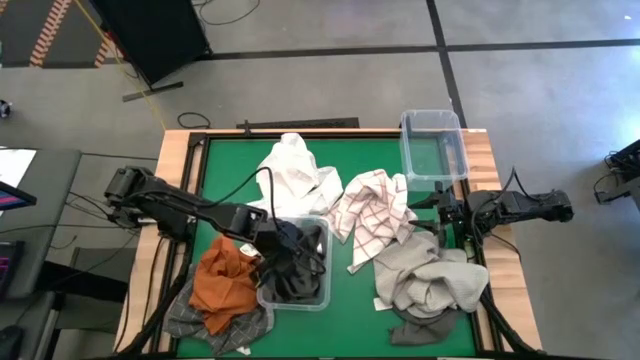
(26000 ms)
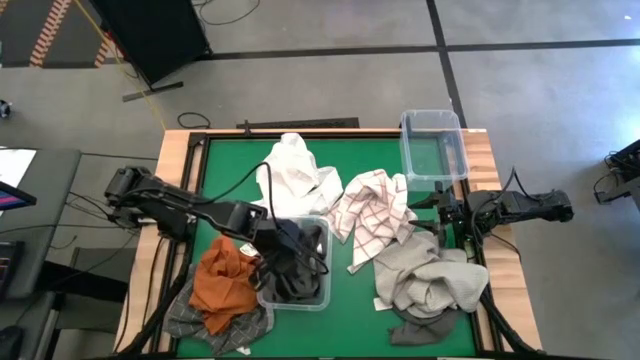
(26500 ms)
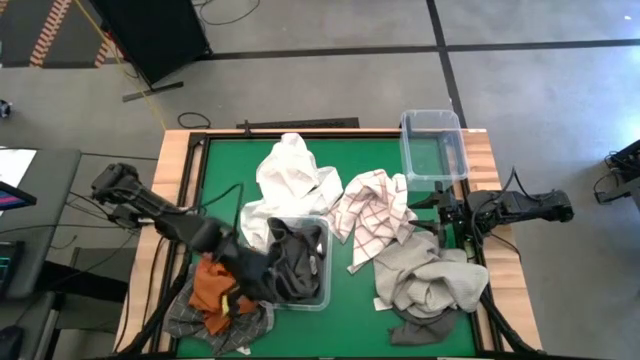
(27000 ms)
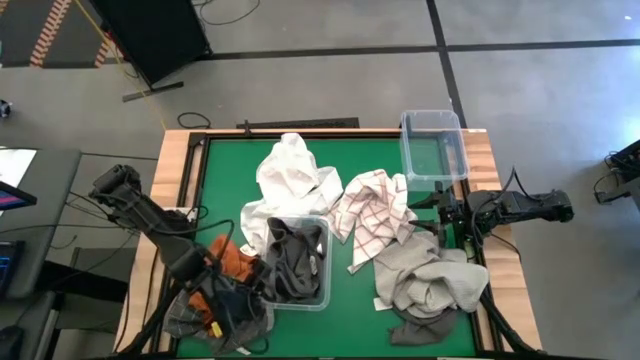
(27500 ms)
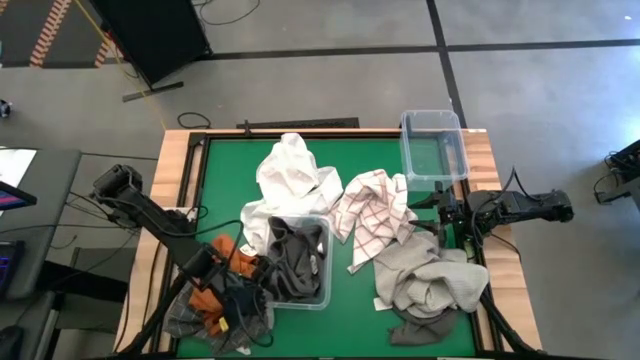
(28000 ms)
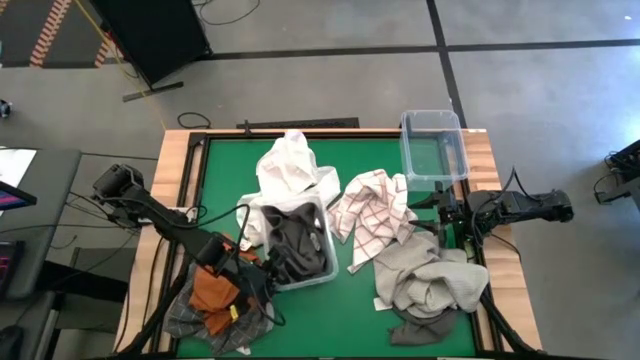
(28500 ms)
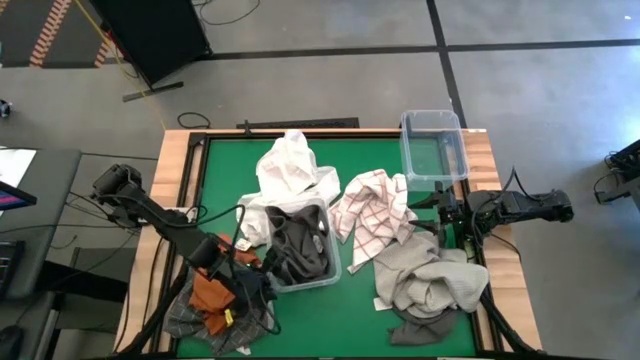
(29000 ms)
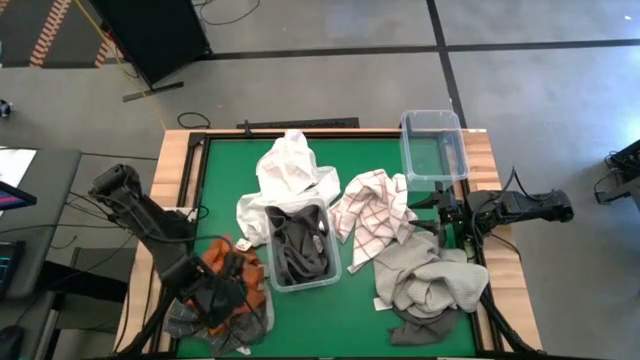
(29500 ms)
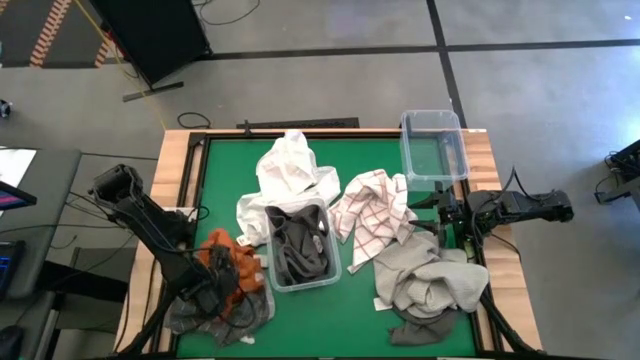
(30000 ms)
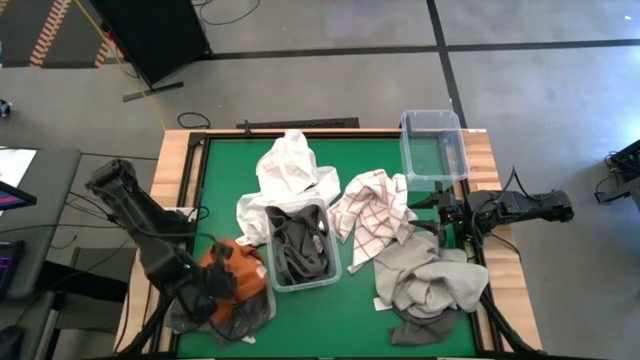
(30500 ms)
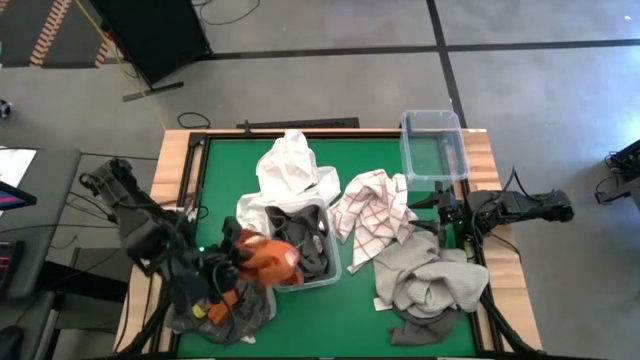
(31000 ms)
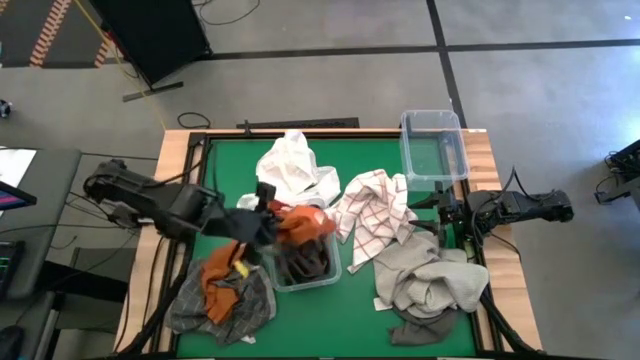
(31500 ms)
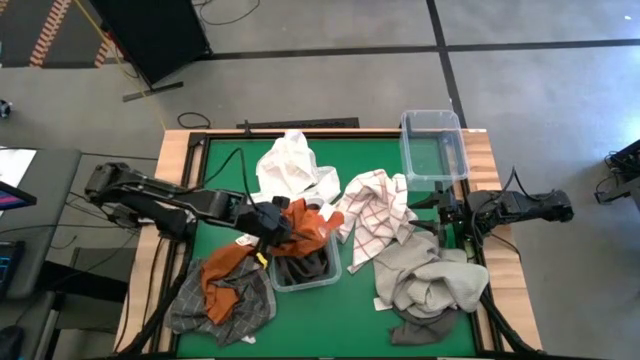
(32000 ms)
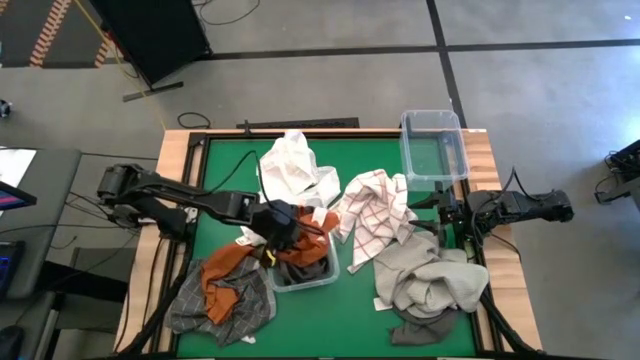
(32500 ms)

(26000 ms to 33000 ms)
Task: Sort towels by color in basket
Put the orange towel into the bottom transparent bin

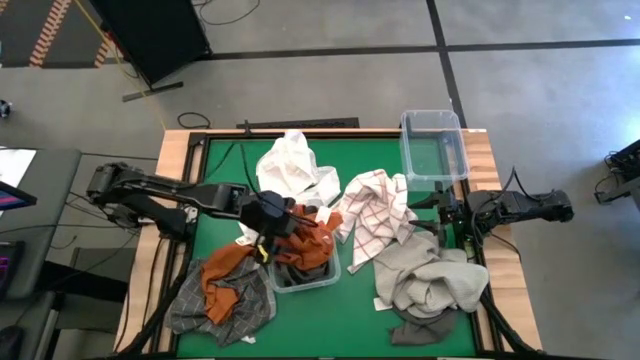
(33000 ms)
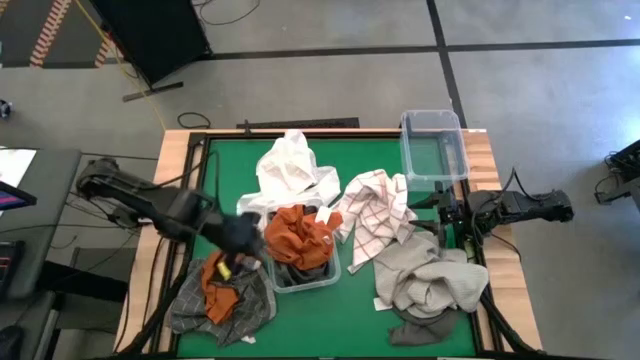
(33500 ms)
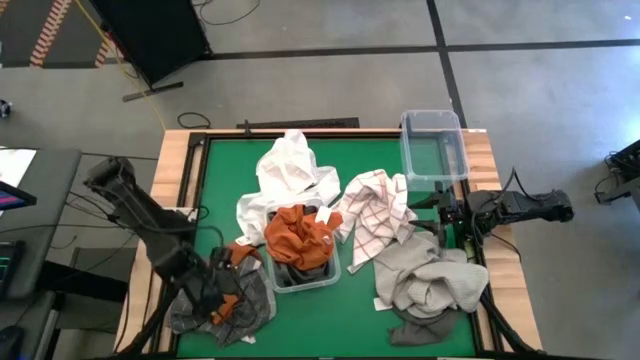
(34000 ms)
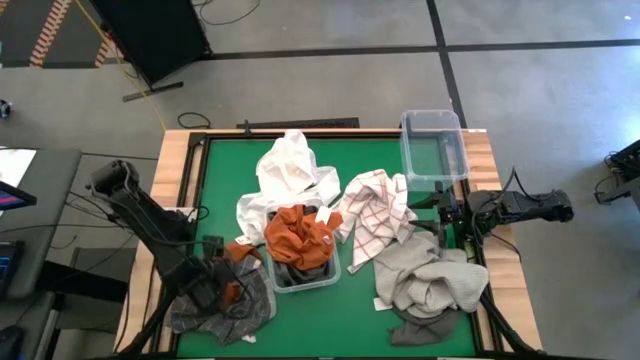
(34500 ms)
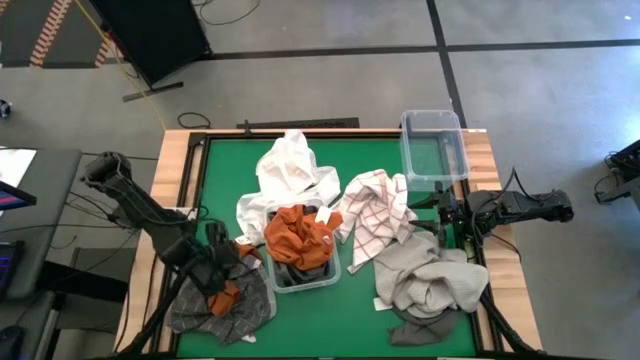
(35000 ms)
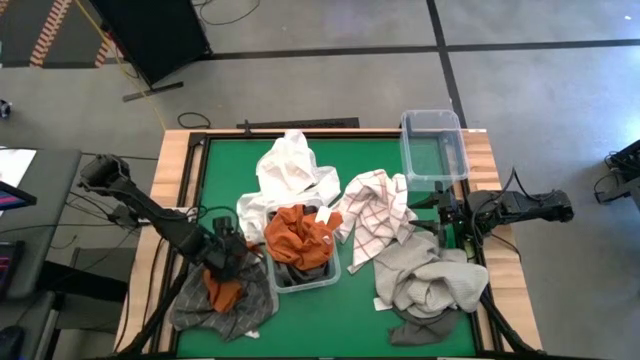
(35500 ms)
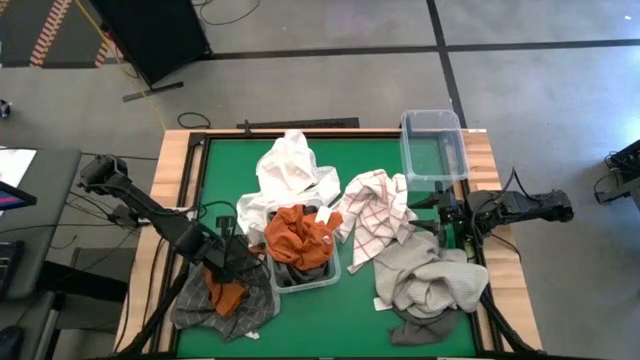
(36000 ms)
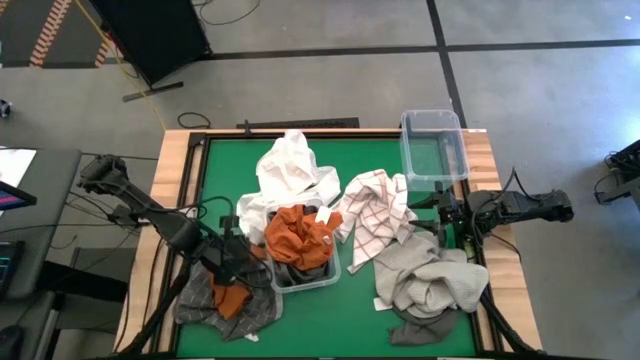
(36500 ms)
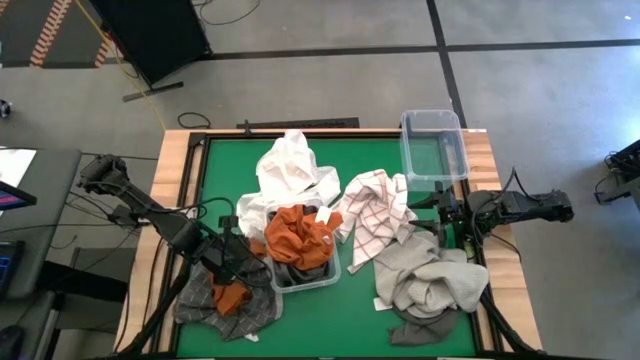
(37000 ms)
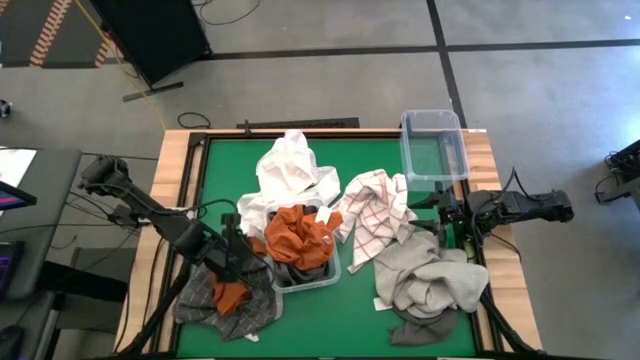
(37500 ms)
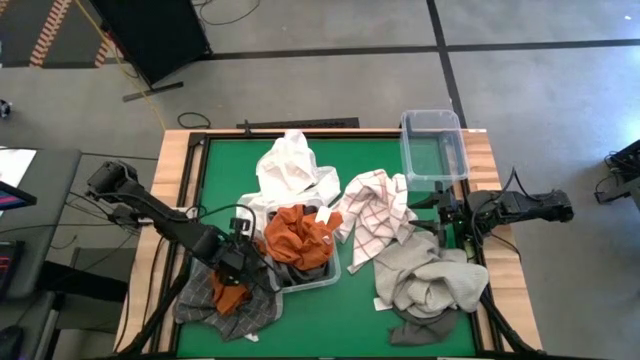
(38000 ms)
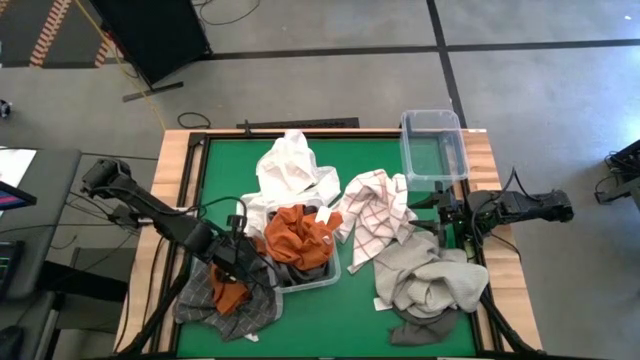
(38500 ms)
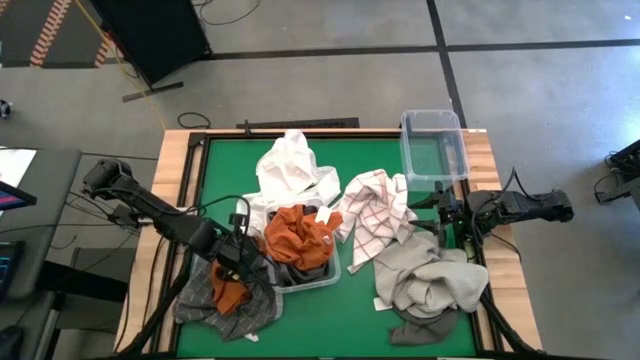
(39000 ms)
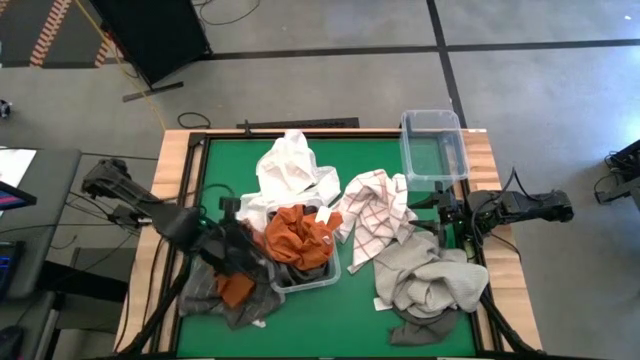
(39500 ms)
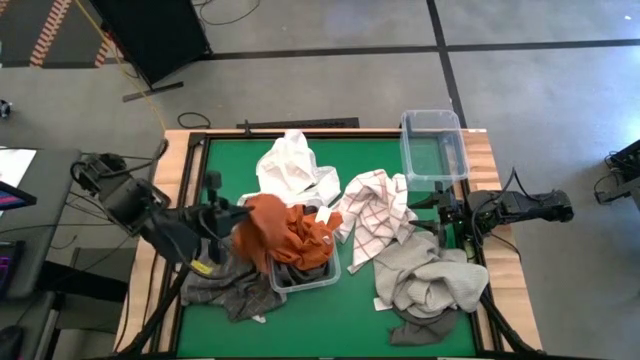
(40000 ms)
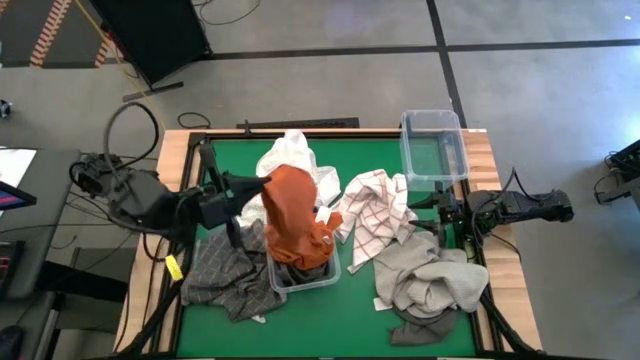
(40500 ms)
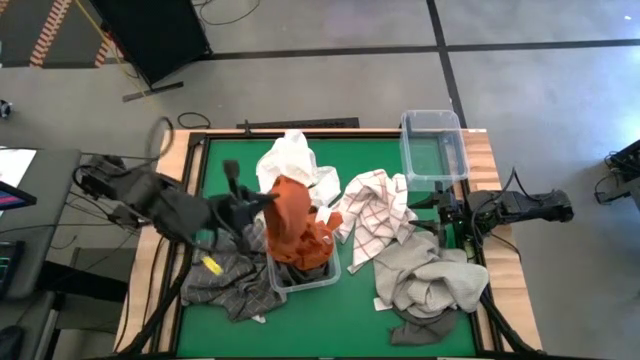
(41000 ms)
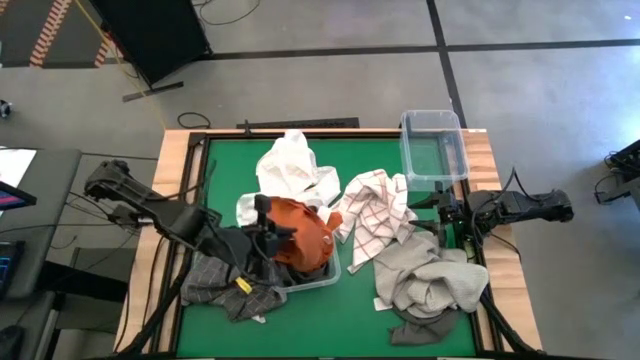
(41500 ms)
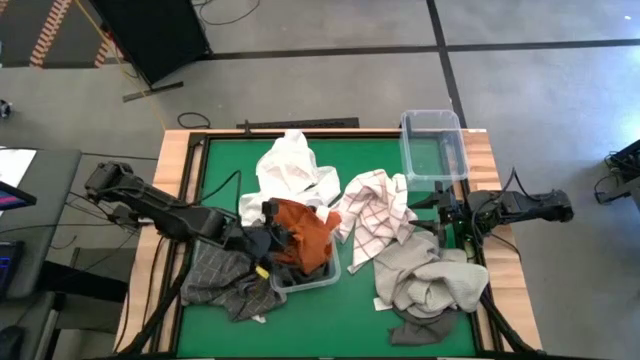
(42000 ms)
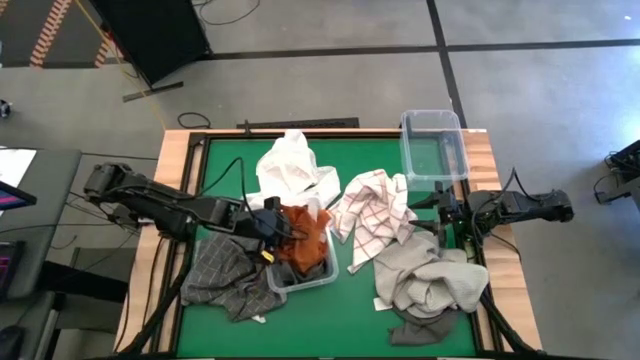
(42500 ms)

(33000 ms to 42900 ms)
Put the orange towel into the bottom transparent bin

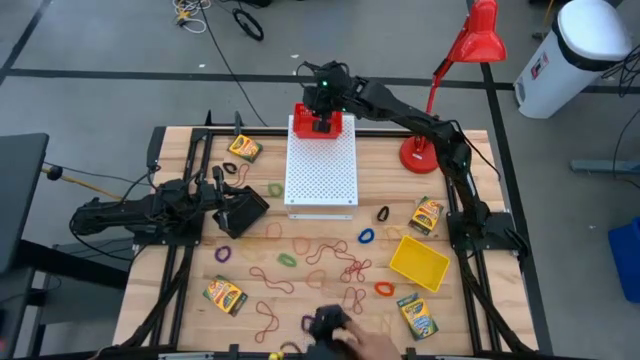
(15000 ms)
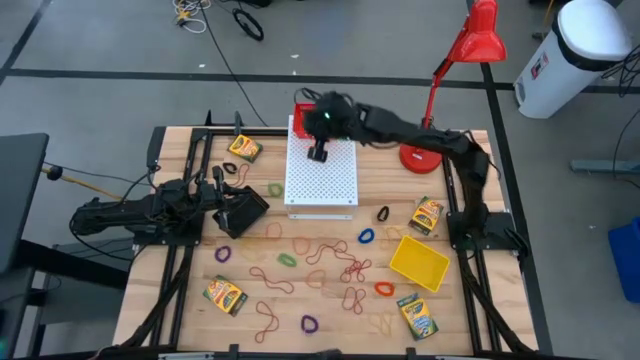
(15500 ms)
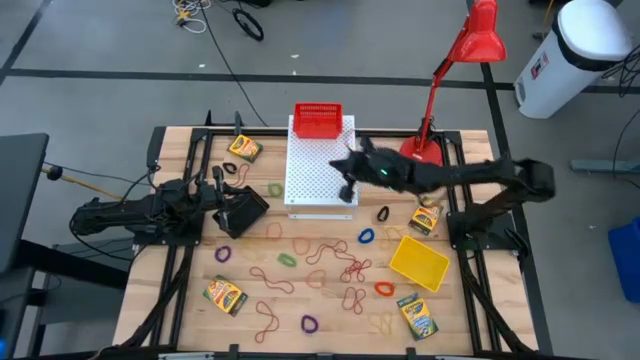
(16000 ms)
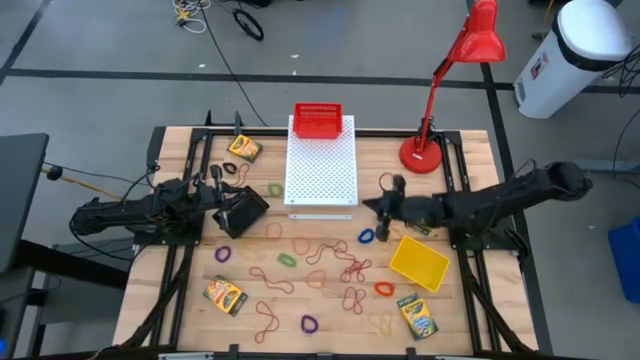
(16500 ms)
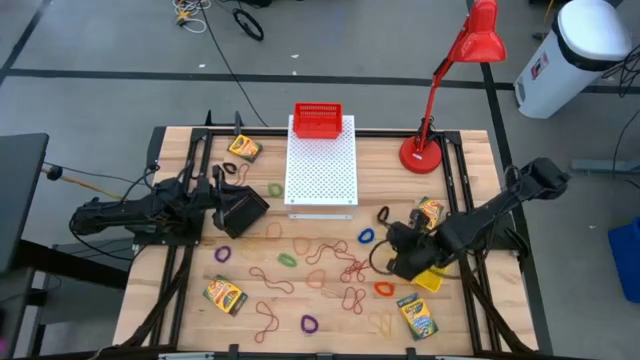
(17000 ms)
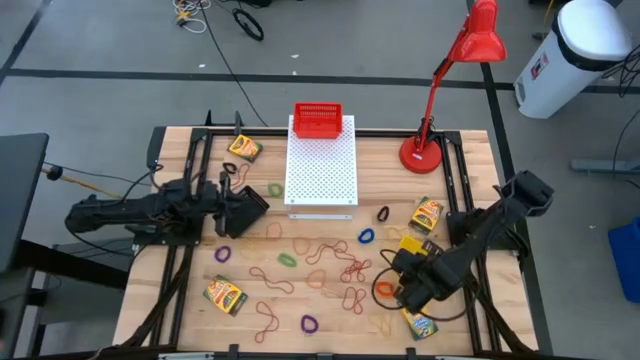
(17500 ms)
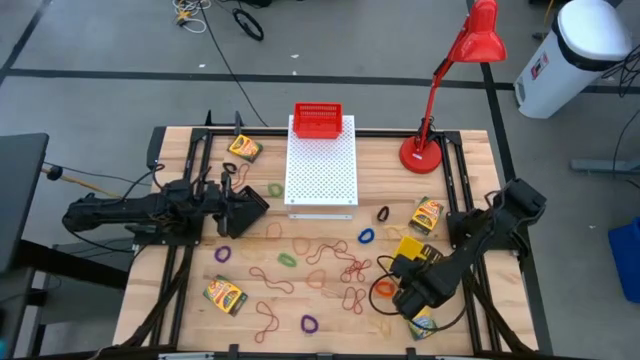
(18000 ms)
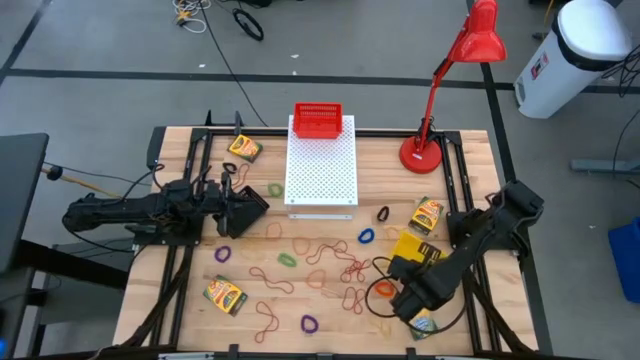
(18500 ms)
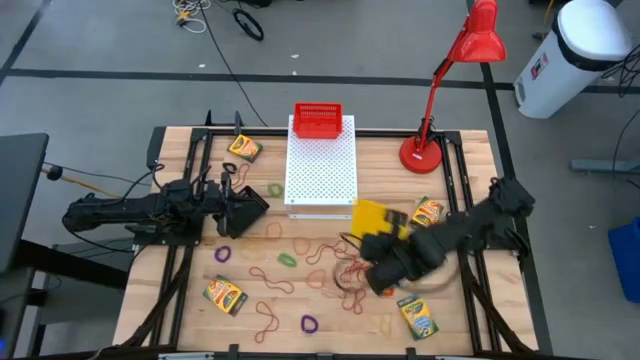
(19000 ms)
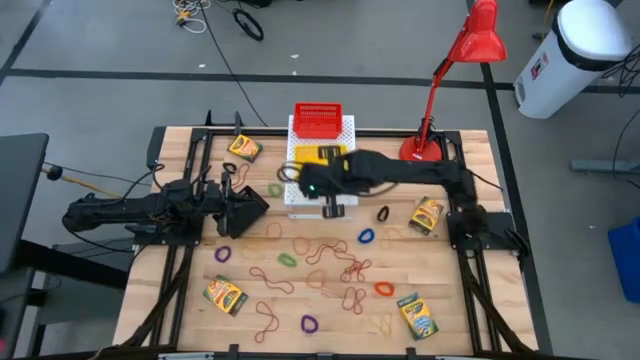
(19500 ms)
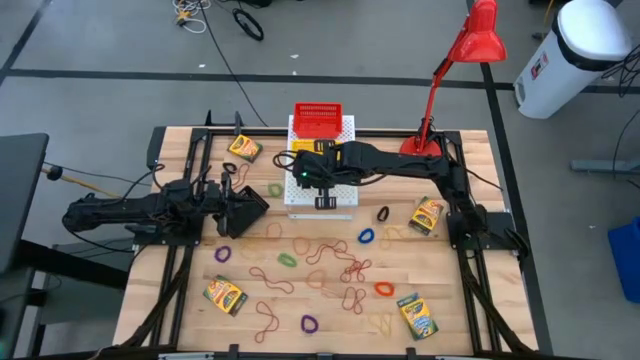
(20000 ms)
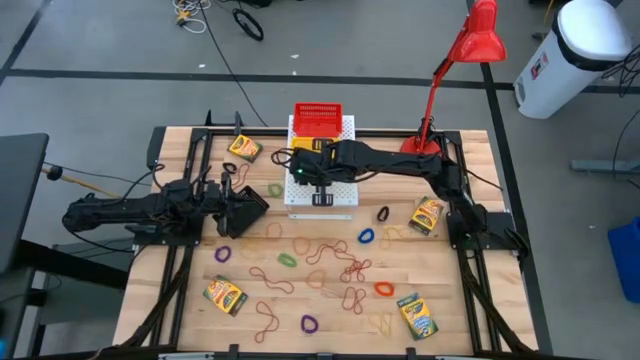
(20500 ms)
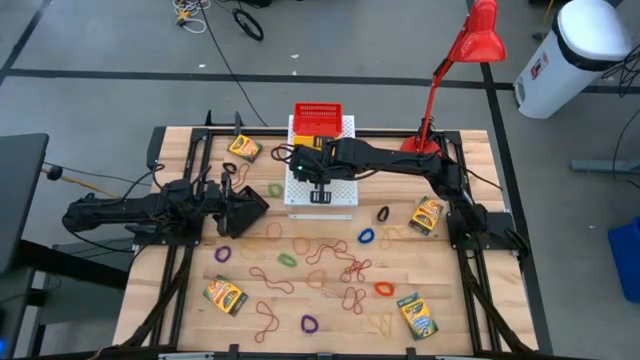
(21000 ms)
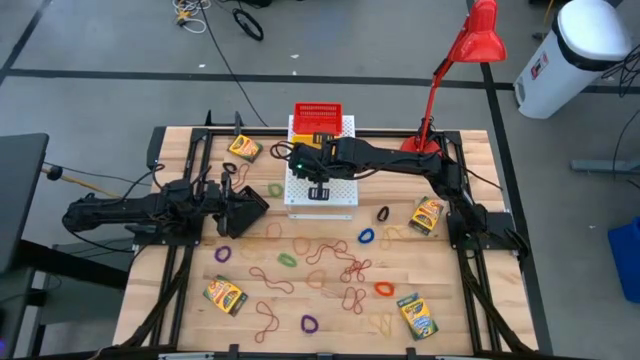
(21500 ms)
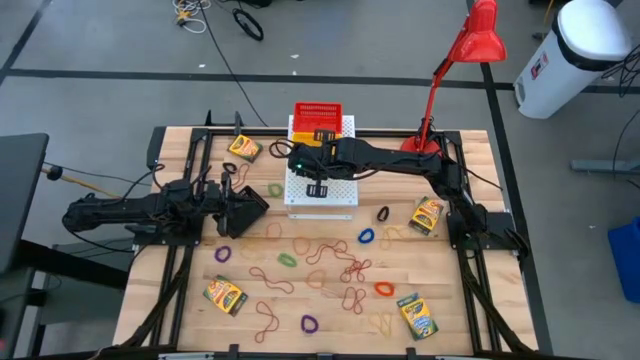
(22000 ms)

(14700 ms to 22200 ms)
Task: Pick & Place Office Desk Supplies
Put the yellow bin on the shelf
